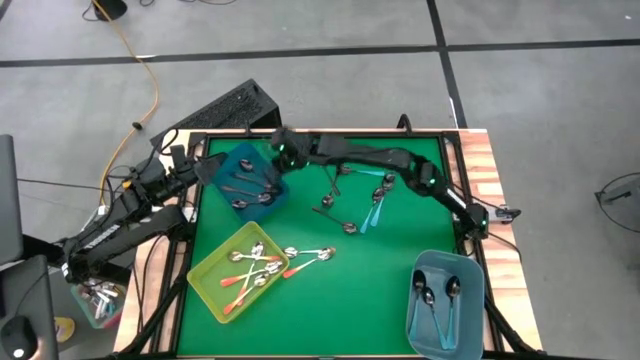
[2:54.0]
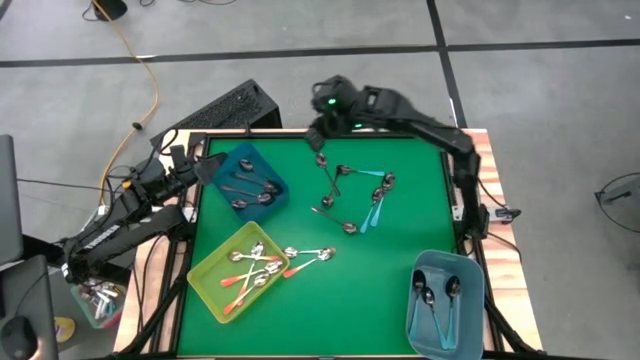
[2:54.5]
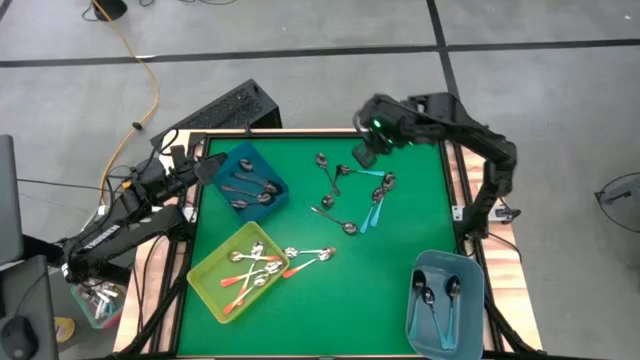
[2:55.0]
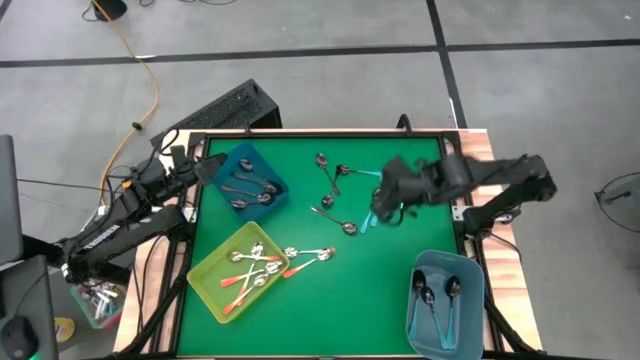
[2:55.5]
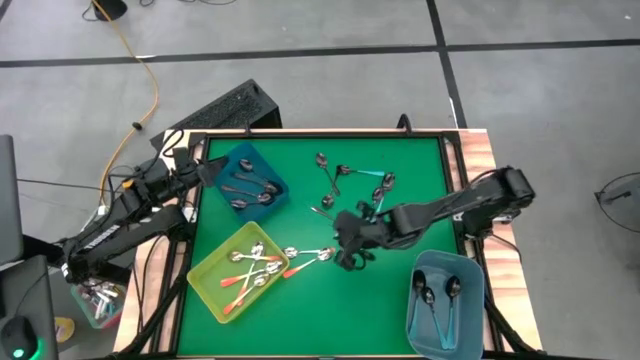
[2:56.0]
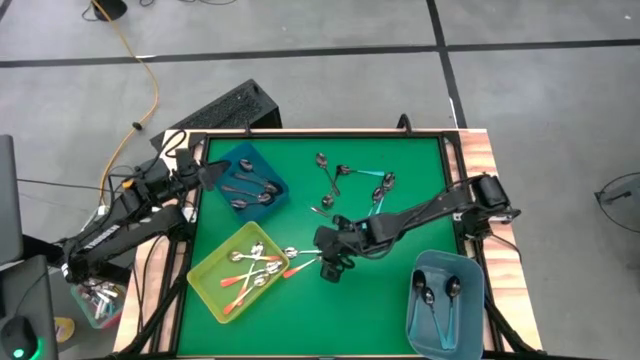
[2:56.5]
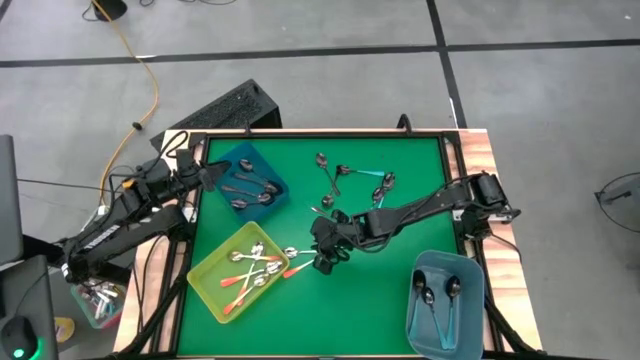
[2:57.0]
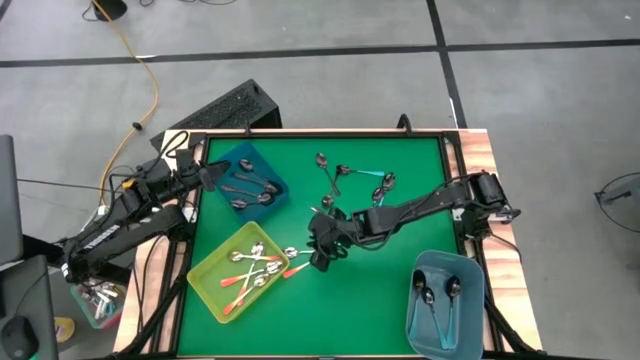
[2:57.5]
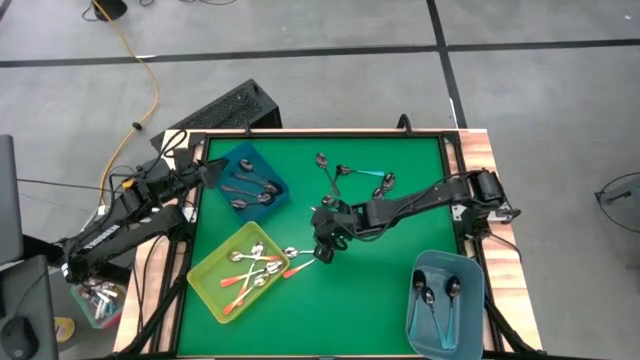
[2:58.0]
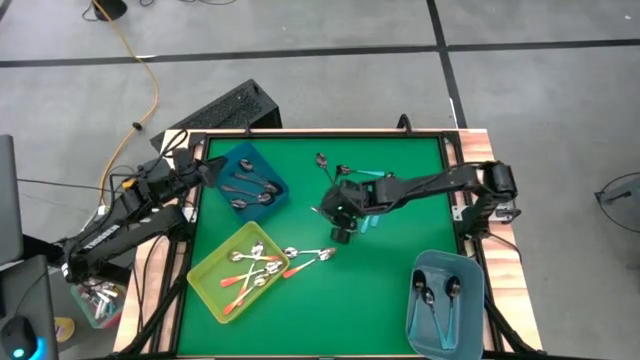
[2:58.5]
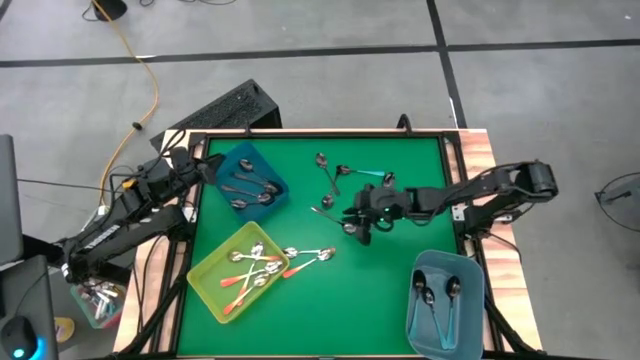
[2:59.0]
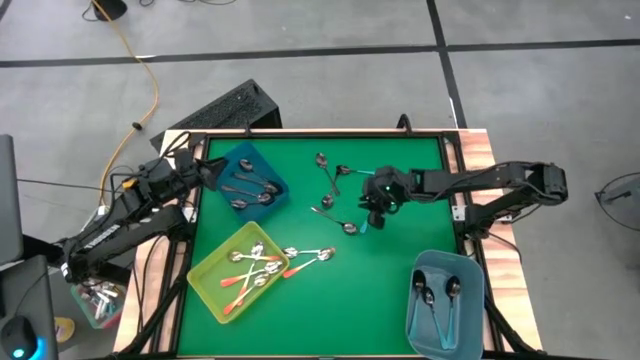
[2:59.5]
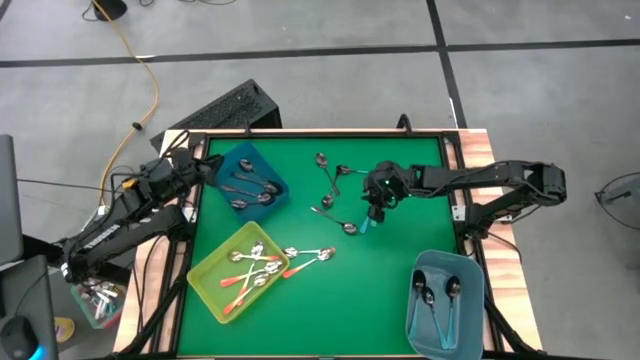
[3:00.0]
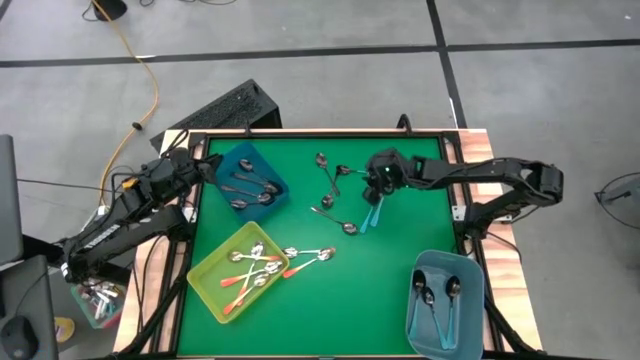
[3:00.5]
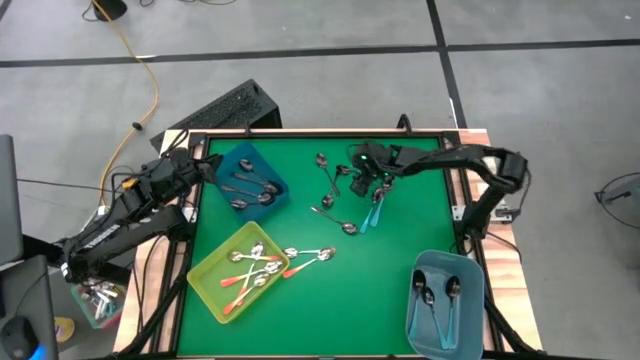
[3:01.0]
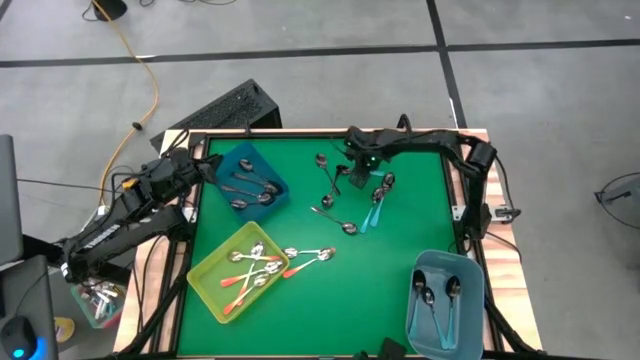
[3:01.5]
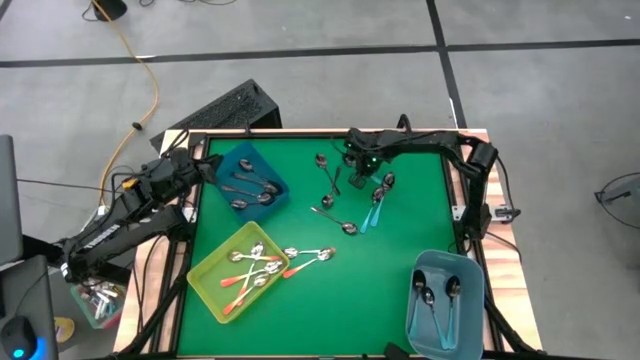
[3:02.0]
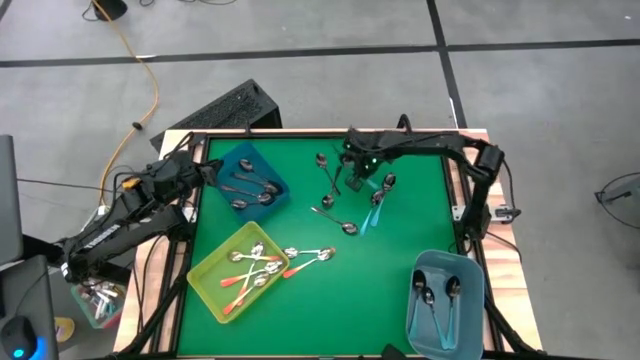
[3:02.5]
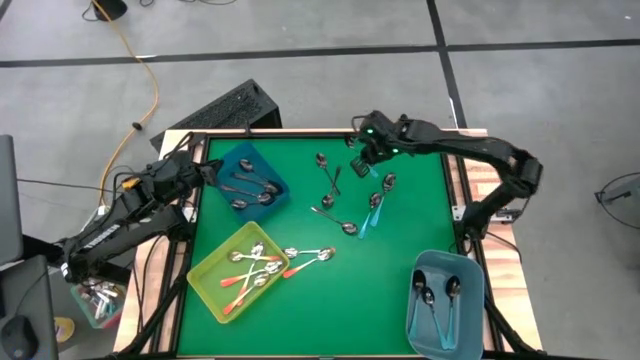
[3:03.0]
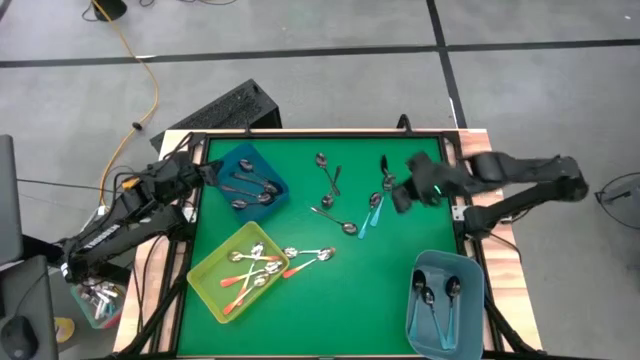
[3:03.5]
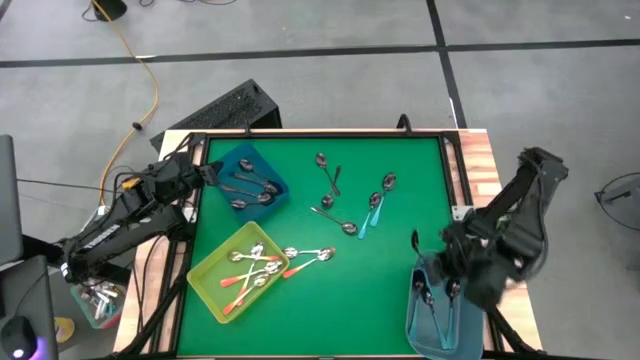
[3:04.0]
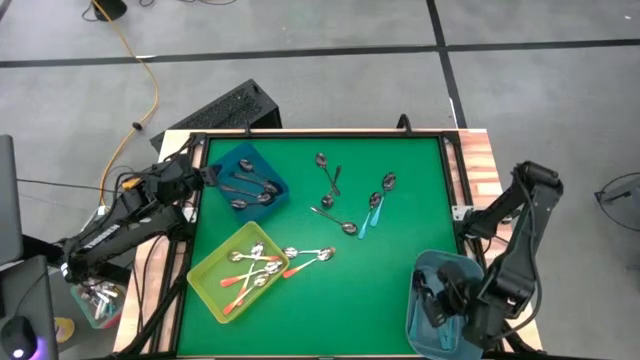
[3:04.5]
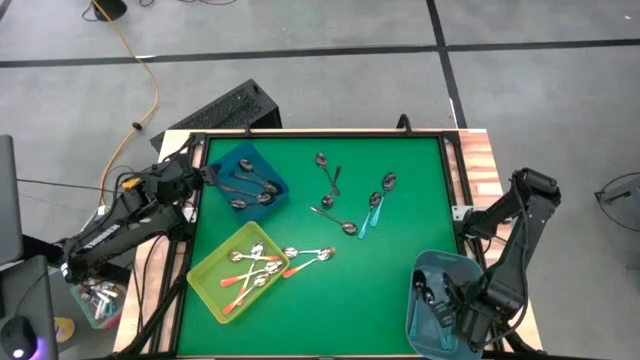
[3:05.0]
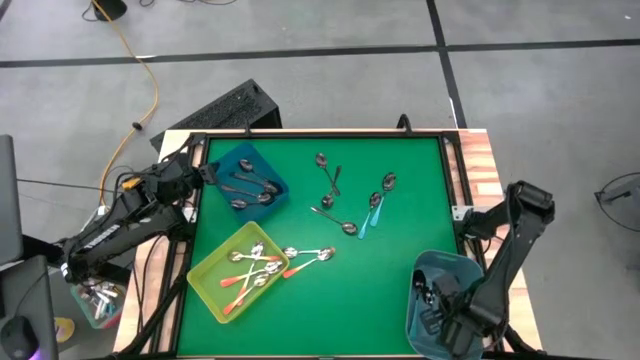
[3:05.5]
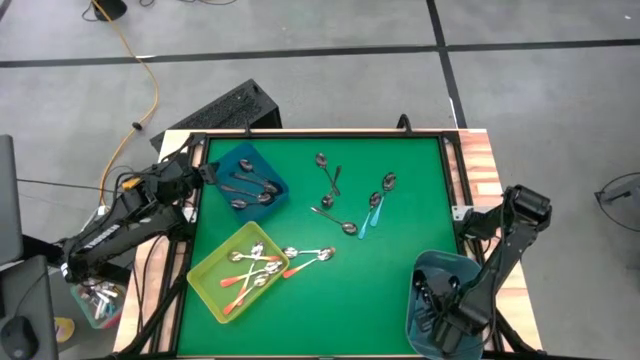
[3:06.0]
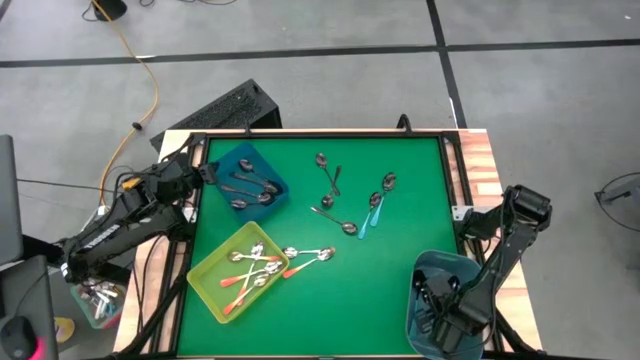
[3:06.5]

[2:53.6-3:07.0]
Task: Sort silverware by color (type)
Put the blue spoon into the blue bin

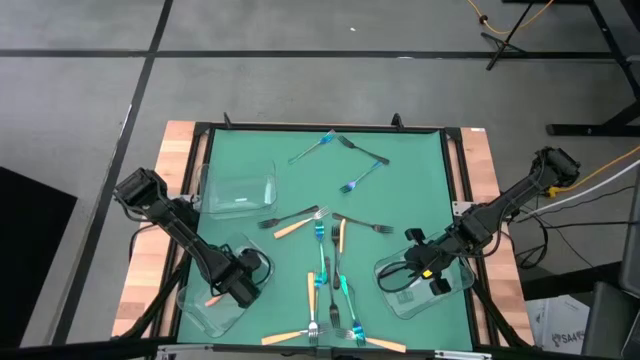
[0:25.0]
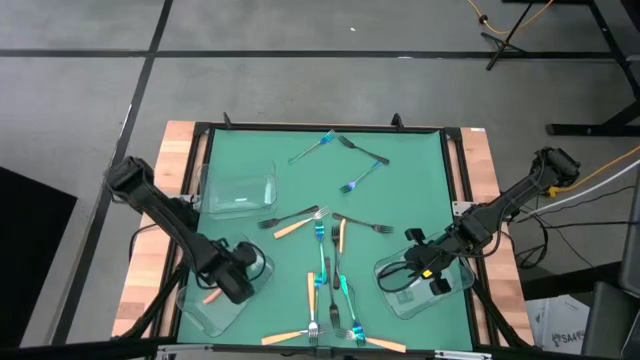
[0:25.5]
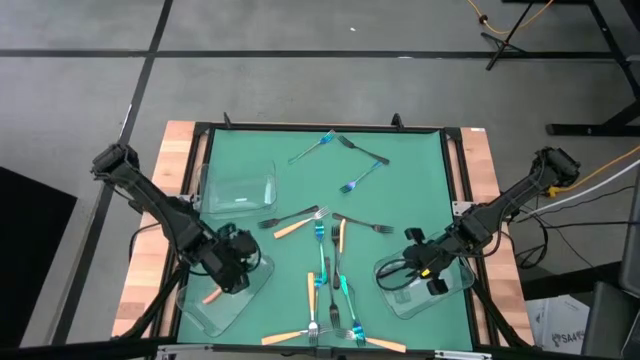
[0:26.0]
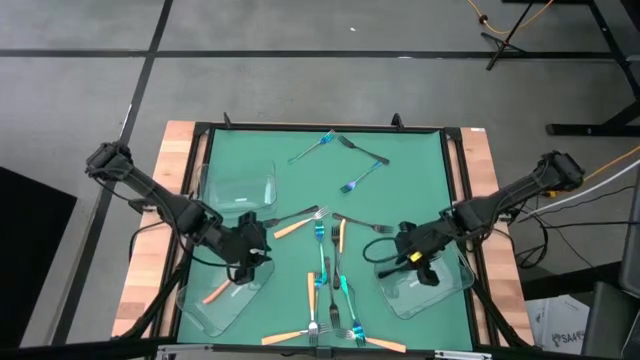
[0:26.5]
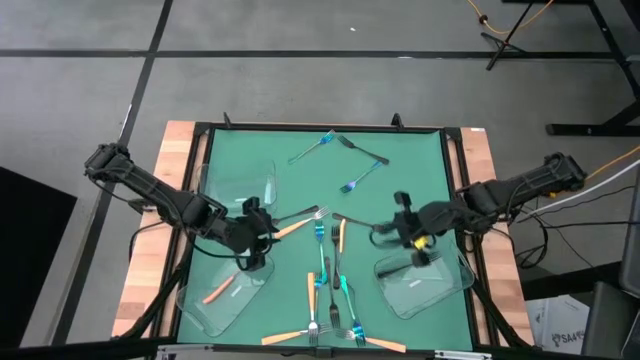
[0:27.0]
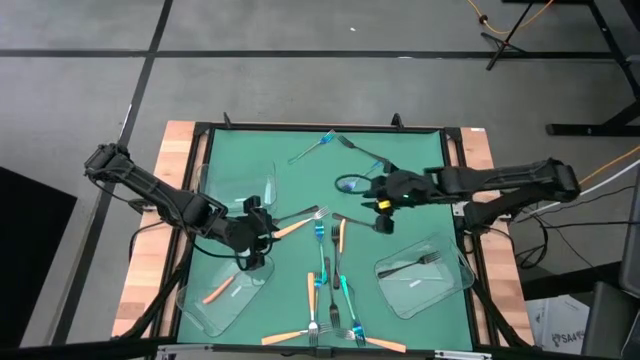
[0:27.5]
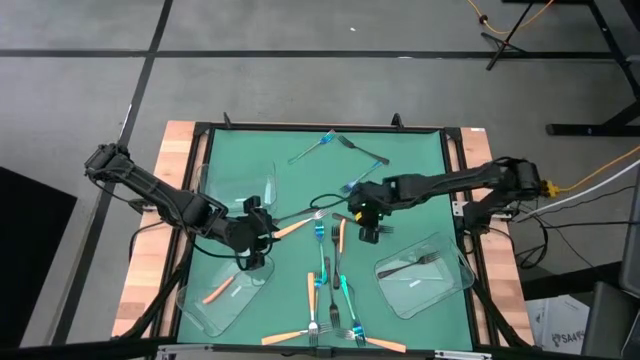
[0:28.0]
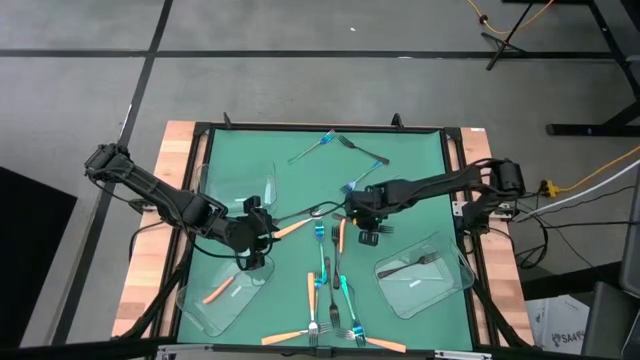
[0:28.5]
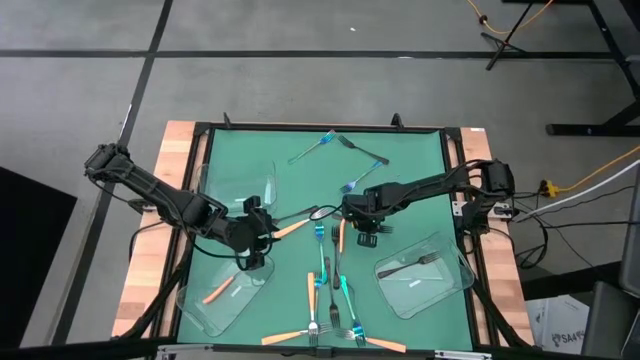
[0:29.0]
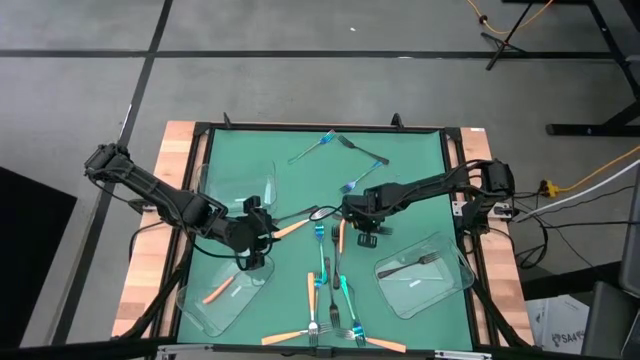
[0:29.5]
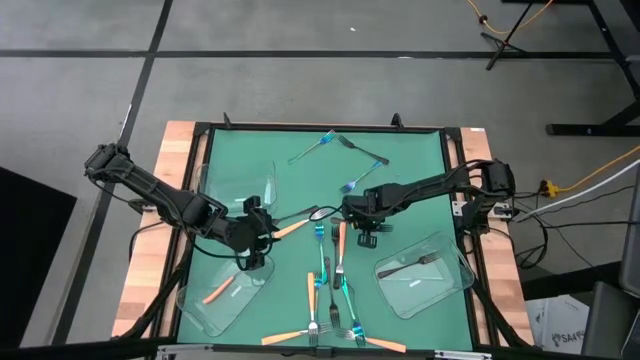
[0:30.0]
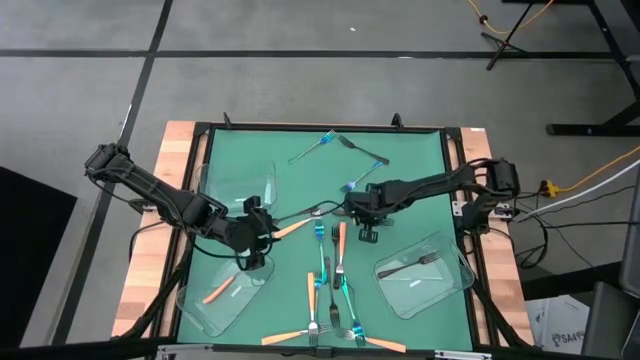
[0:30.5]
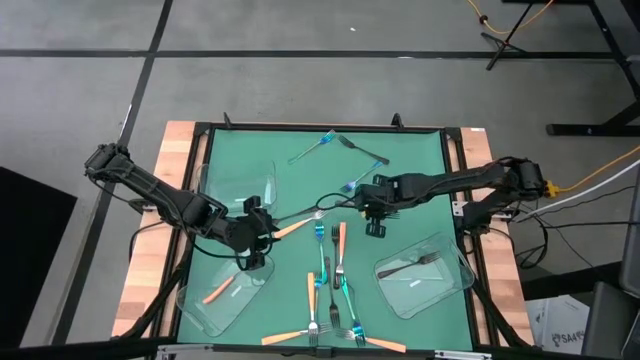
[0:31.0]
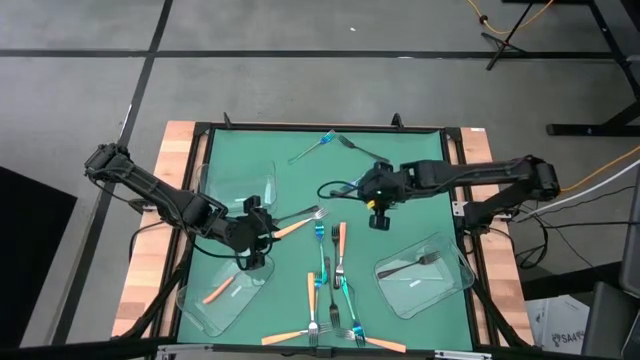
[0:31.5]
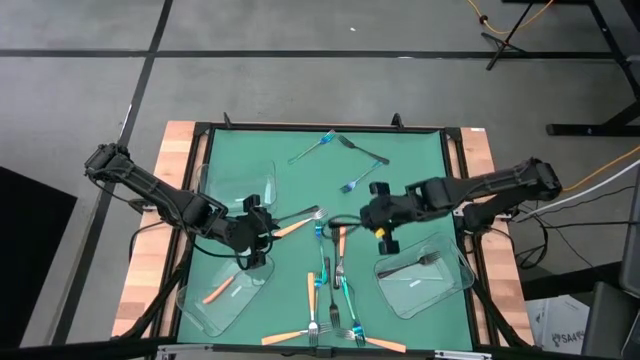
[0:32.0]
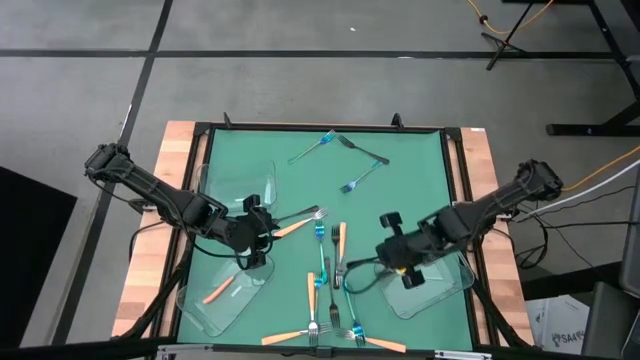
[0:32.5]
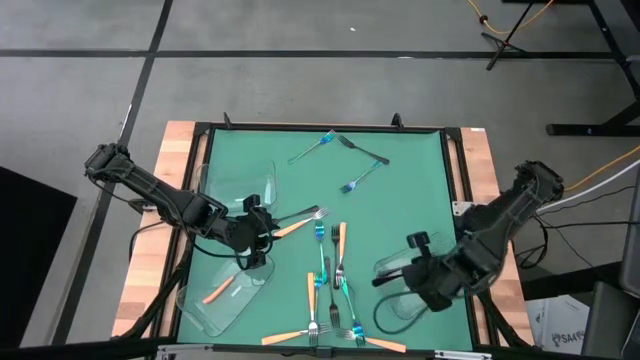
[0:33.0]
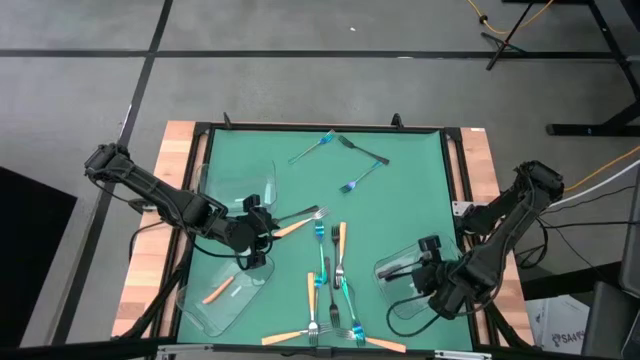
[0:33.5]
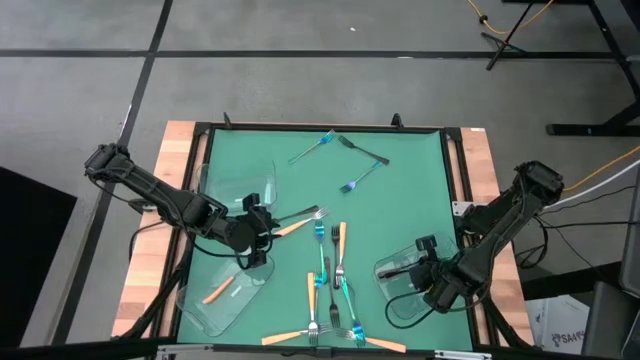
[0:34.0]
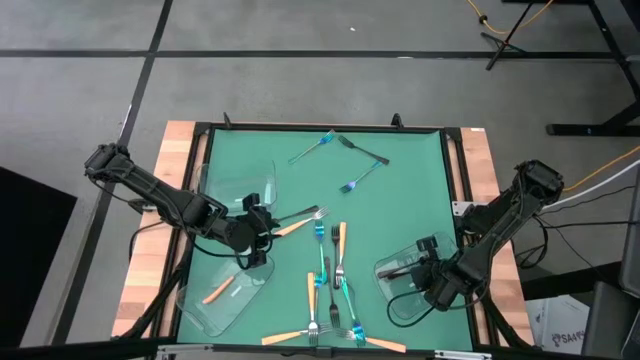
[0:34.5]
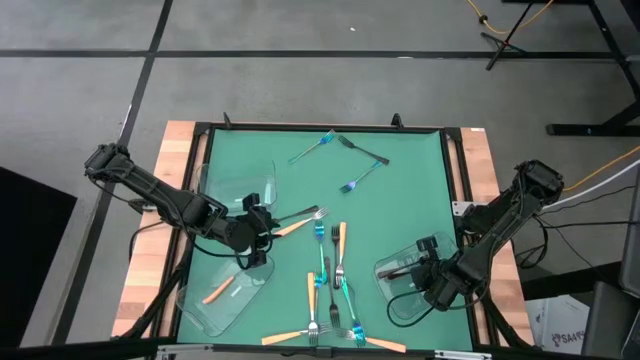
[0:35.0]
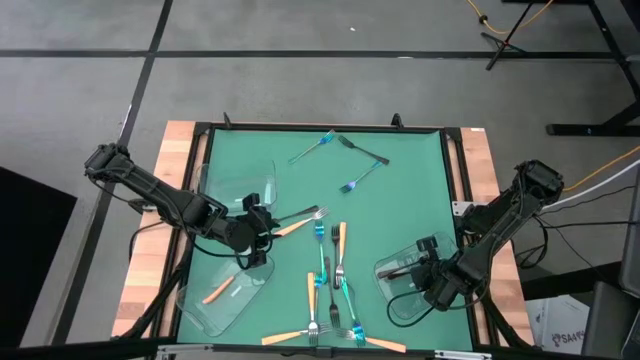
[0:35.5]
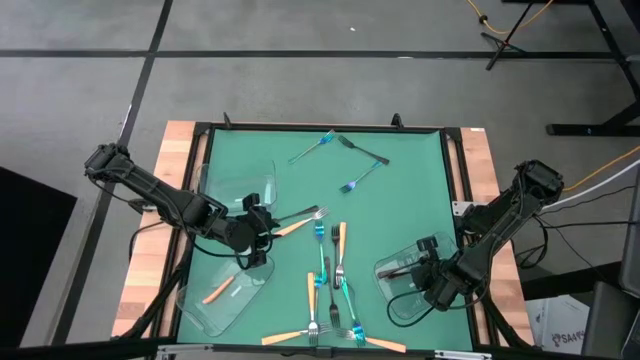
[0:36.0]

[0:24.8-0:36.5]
Task: Sort silverware by color (type)
Put the black fork into the bottom right transparent bin
